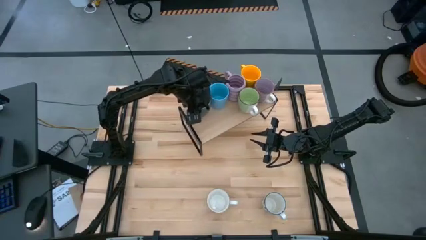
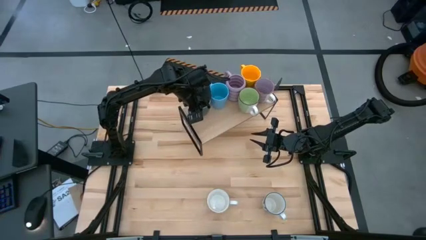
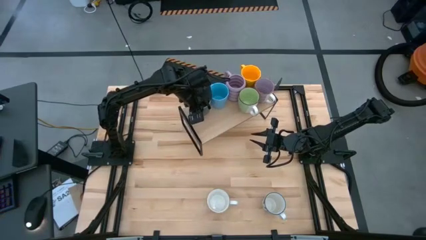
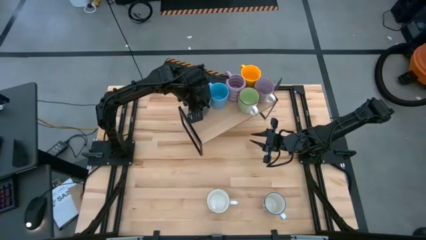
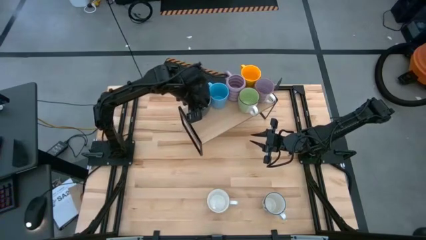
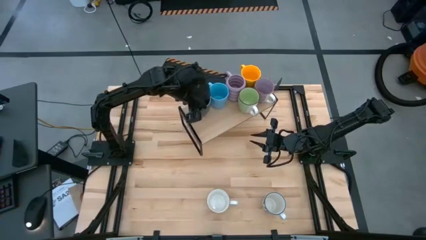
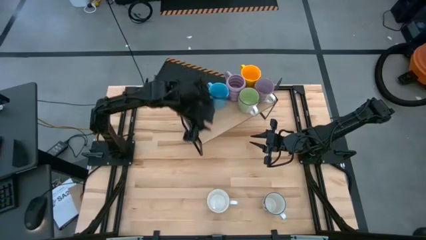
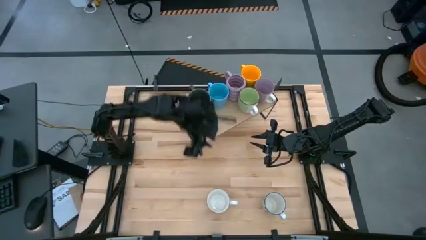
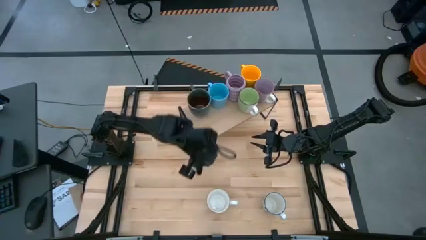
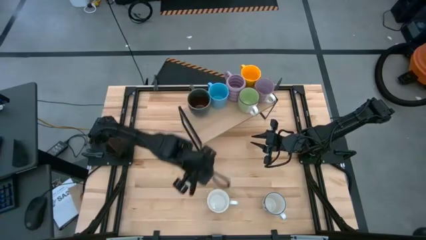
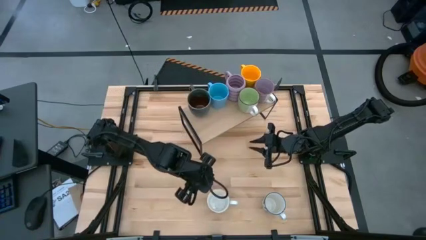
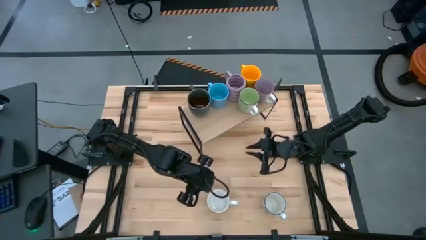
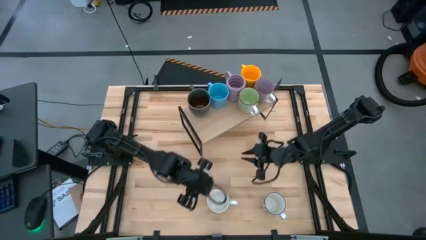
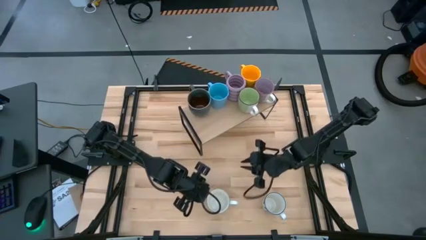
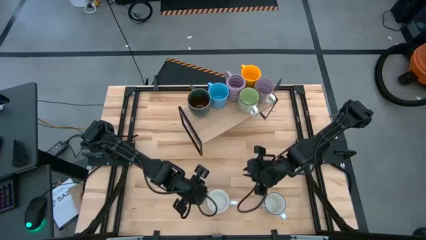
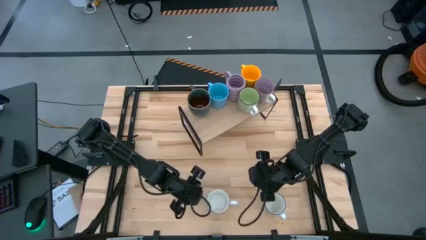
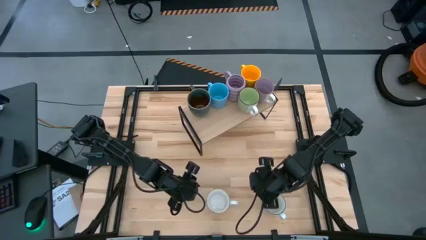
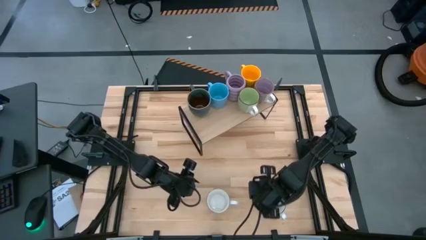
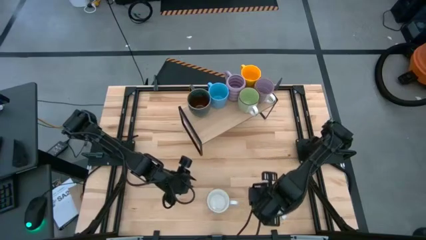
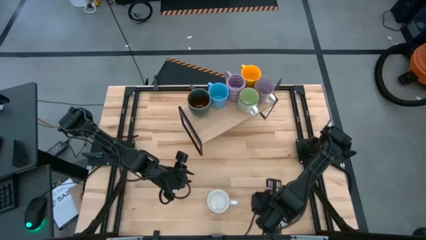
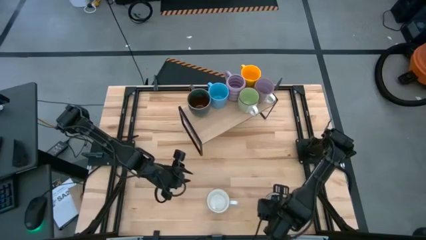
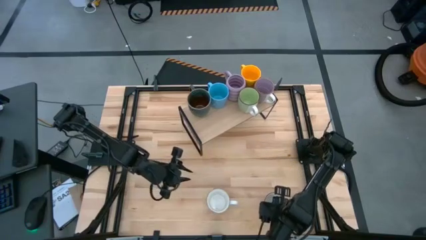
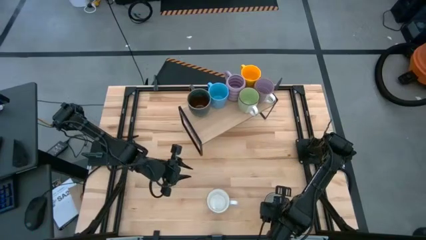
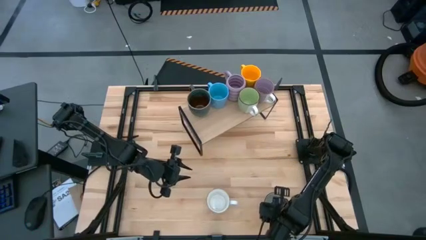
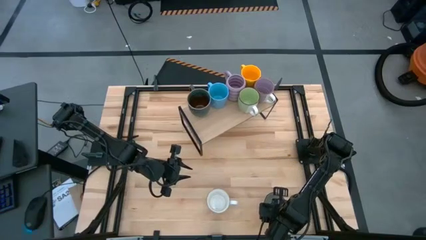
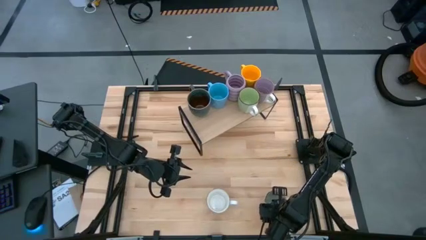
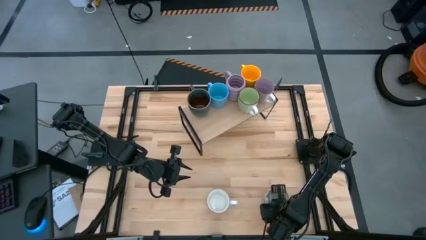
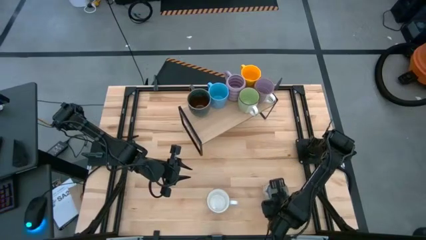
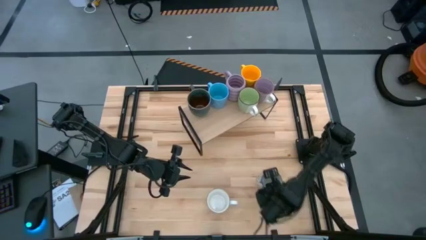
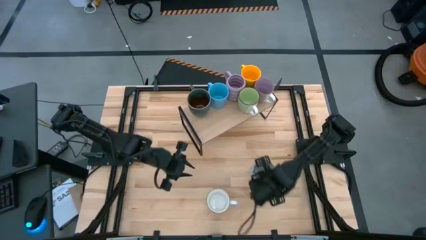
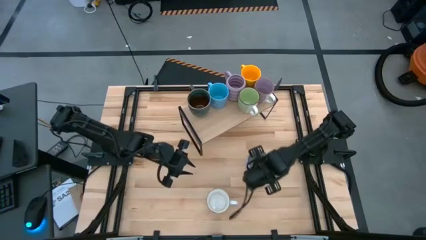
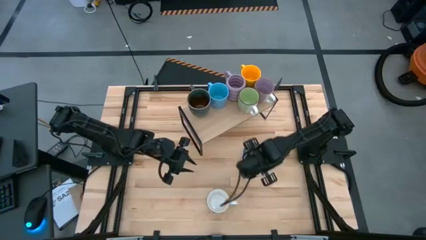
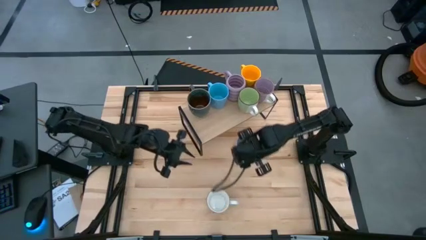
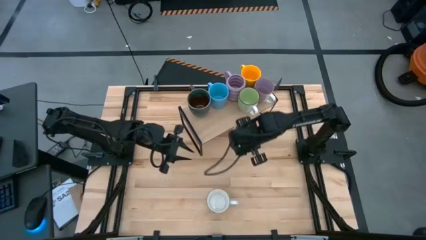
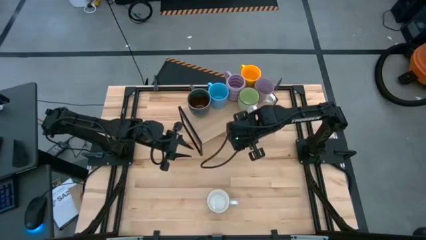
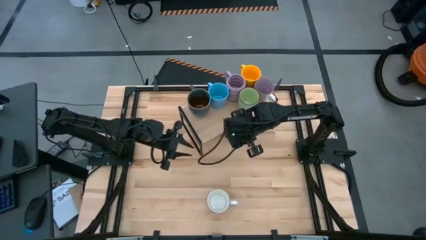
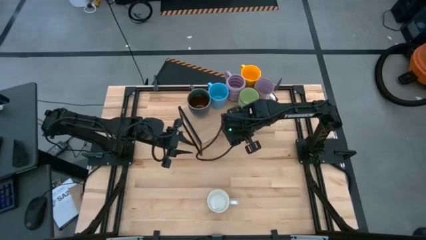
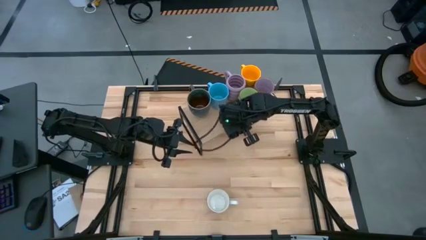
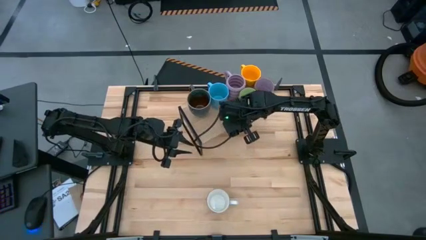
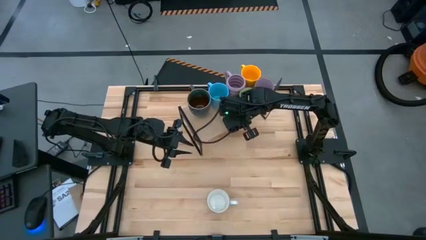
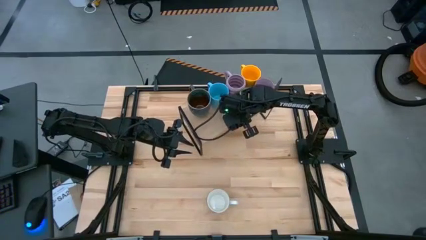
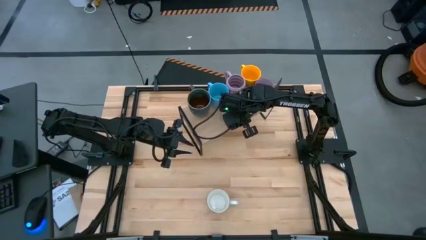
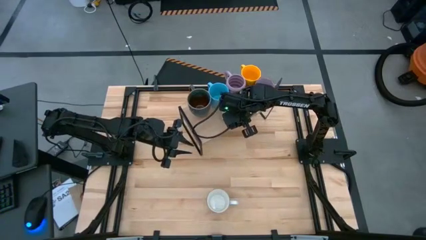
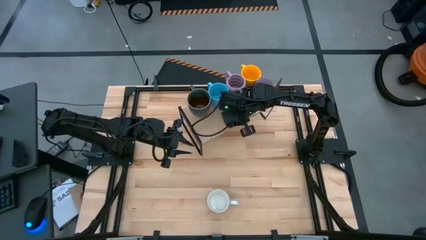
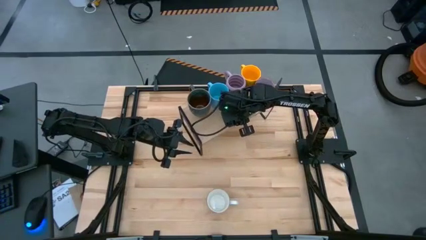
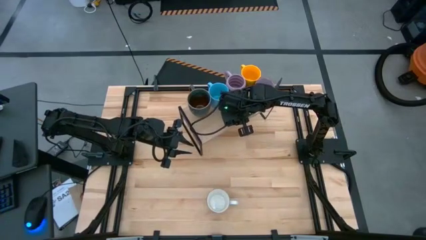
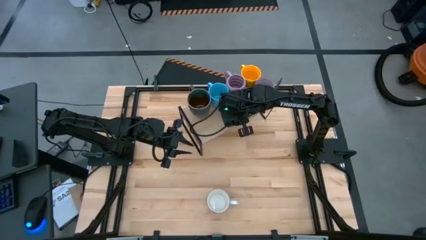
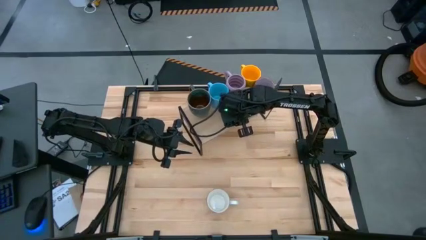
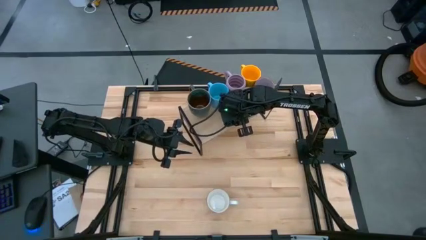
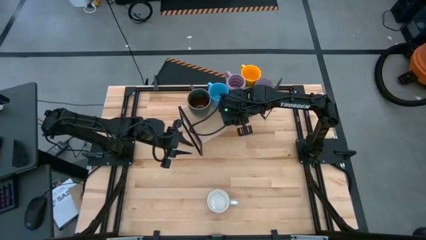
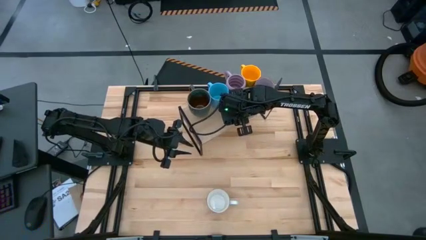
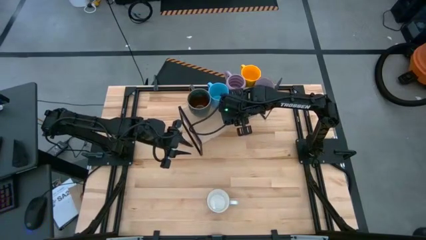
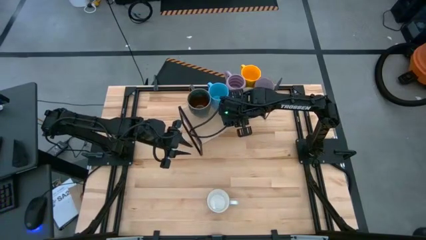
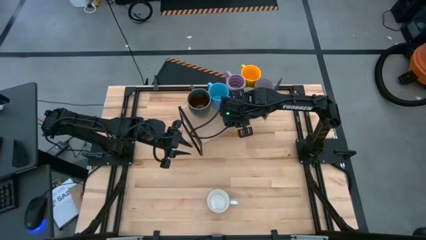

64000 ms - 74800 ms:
Task: Place coffee mugs
Put the blue patterned mug on the shelf

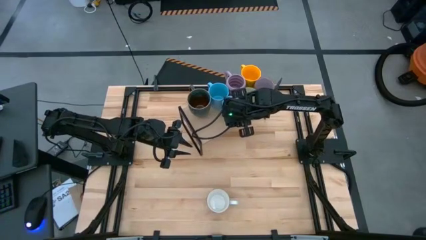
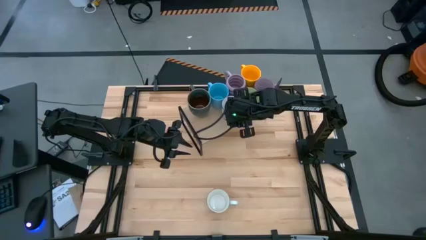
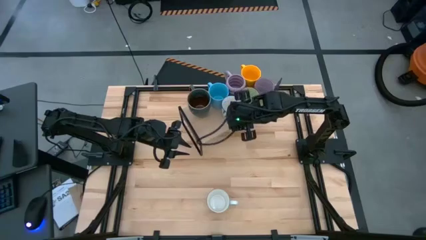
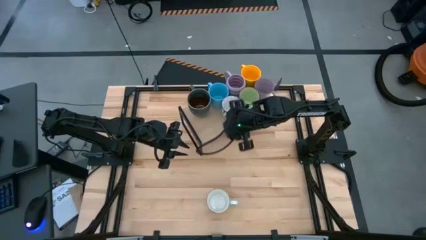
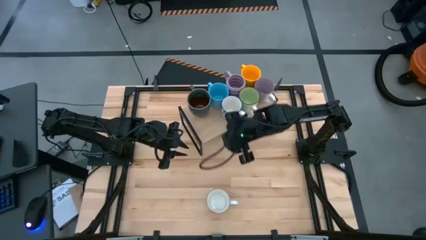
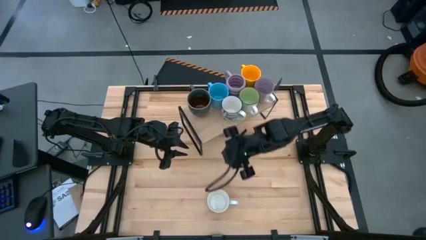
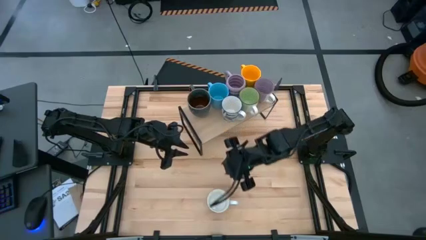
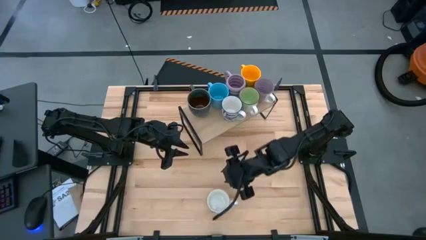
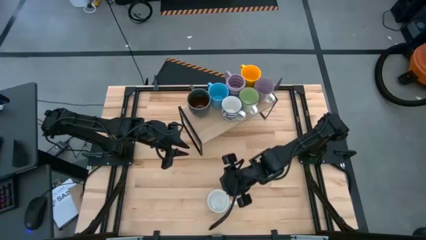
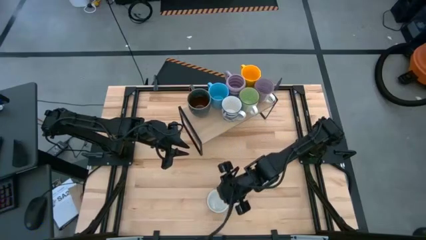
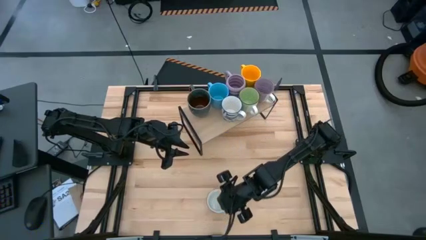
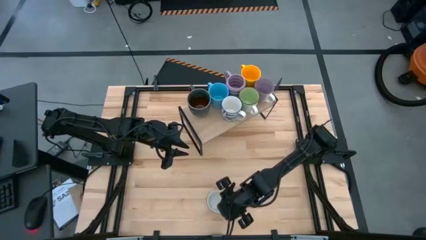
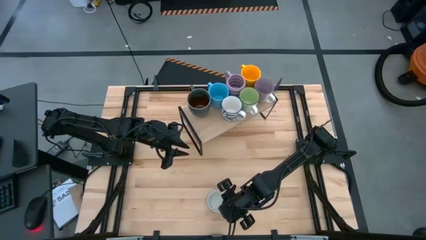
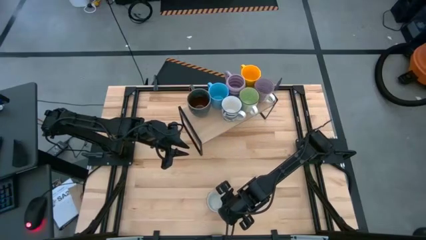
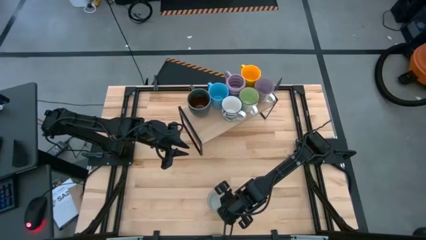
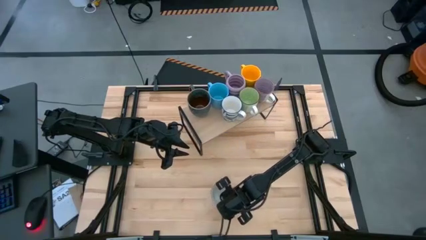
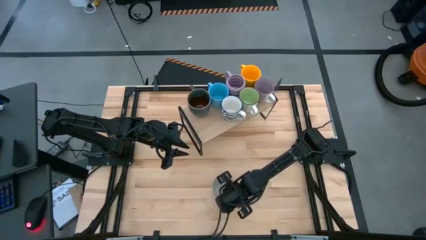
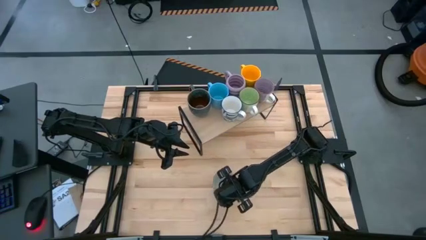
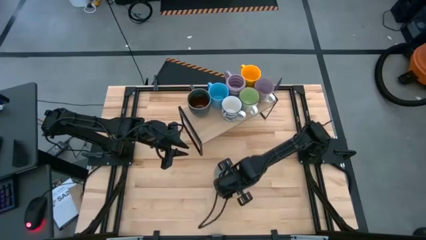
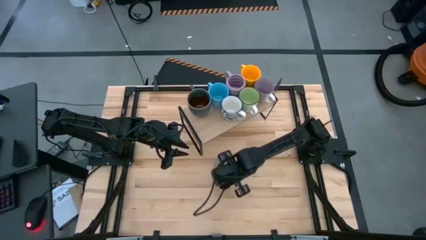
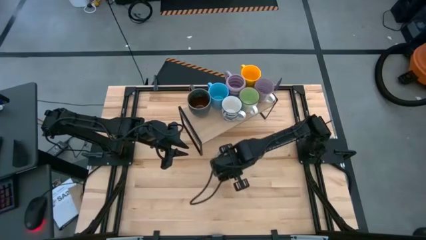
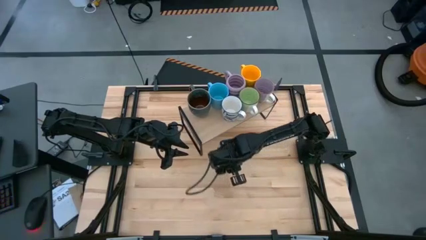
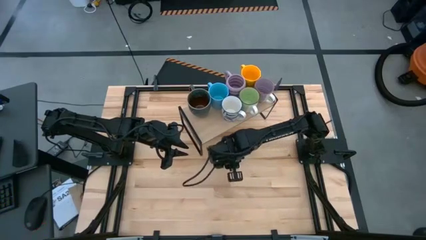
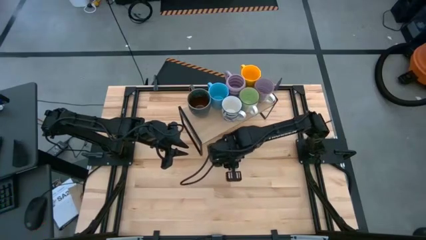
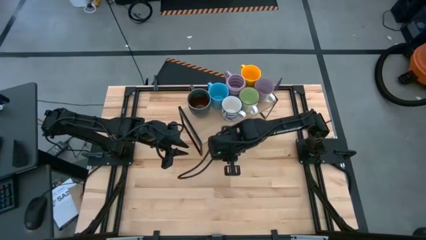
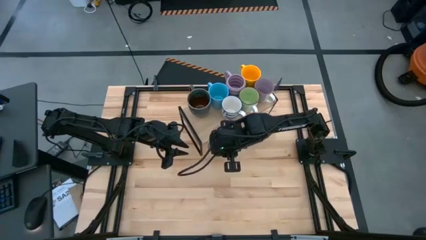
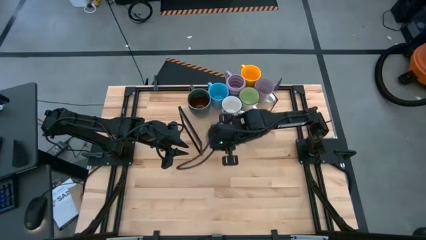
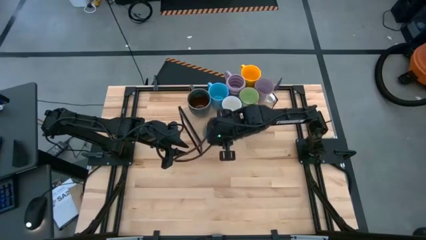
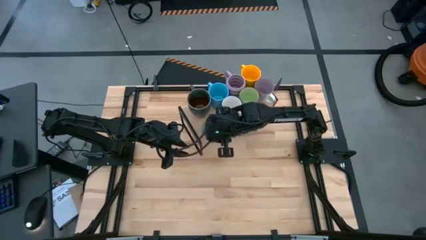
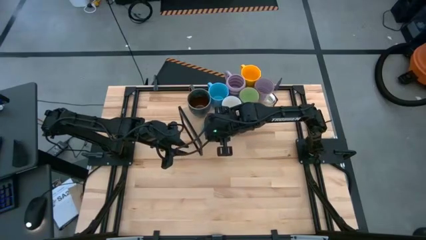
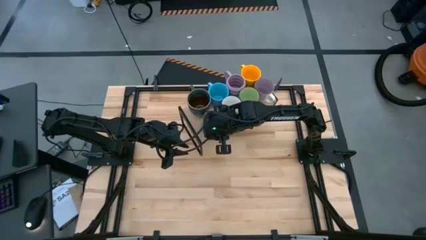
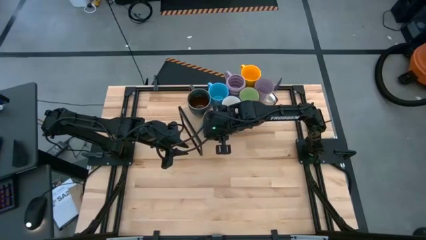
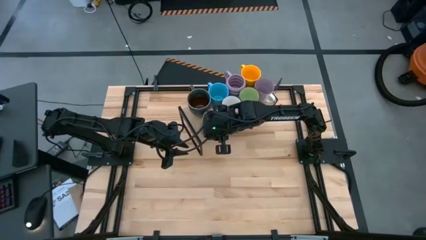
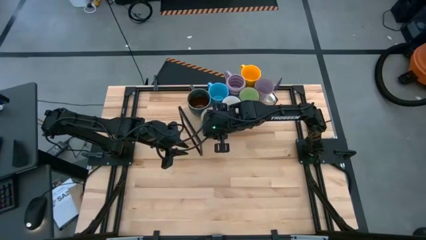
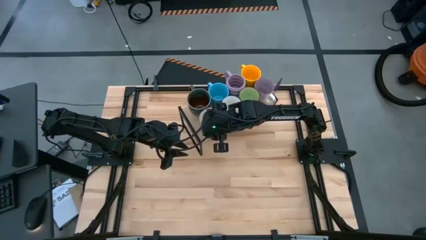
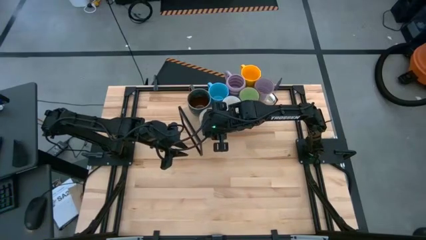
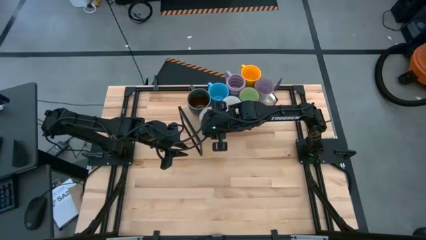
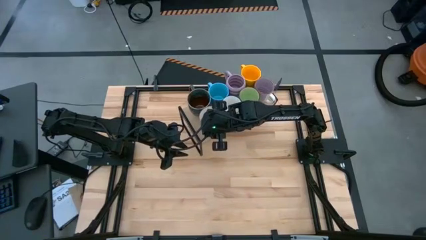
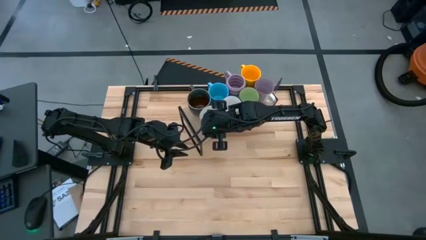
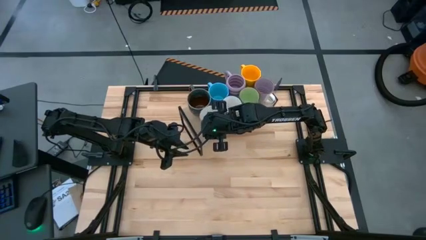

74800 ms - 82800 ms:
Put the light blue mug on the shelf
